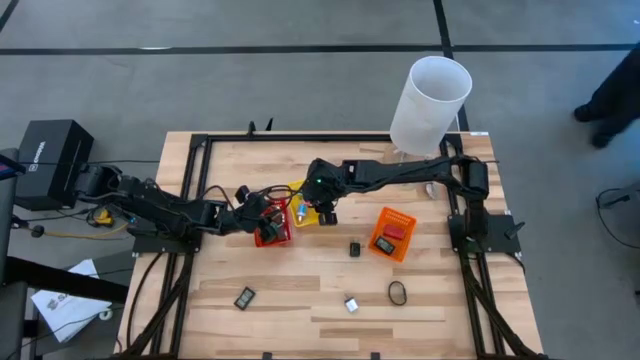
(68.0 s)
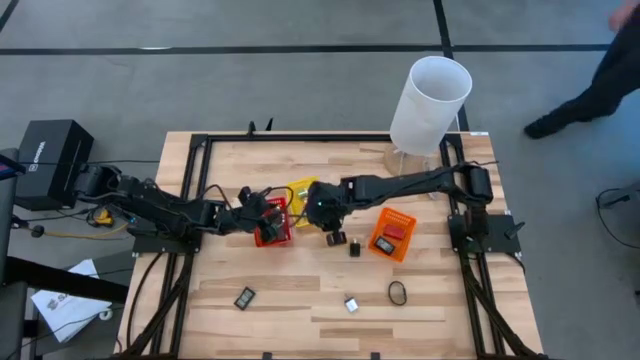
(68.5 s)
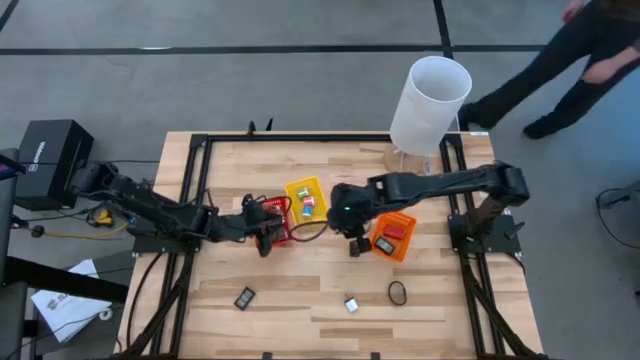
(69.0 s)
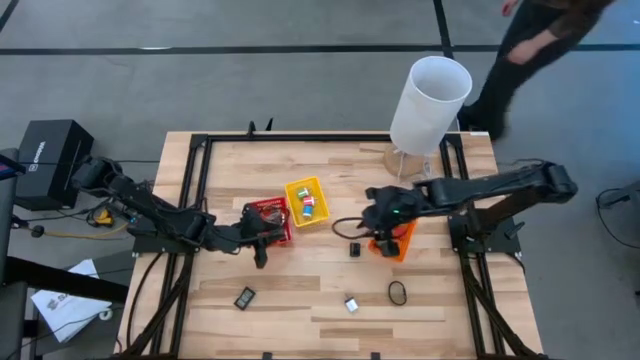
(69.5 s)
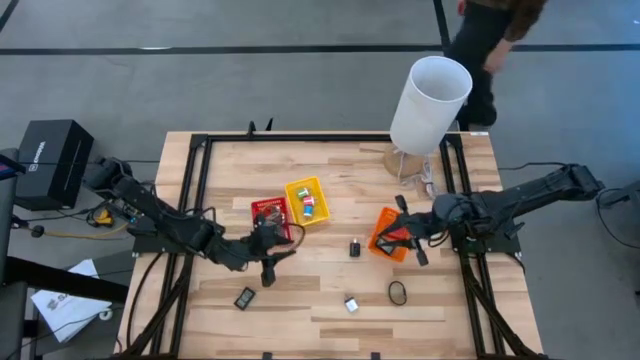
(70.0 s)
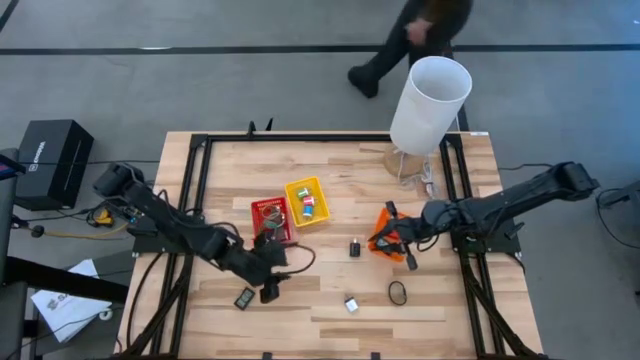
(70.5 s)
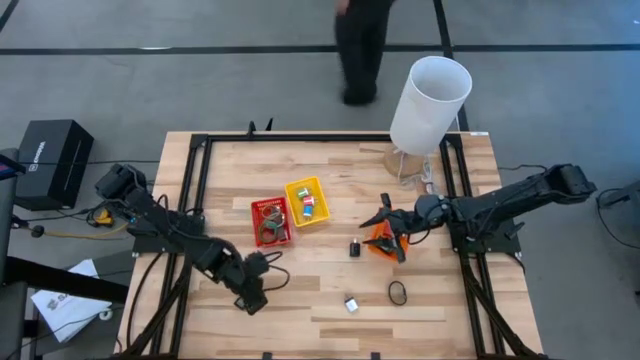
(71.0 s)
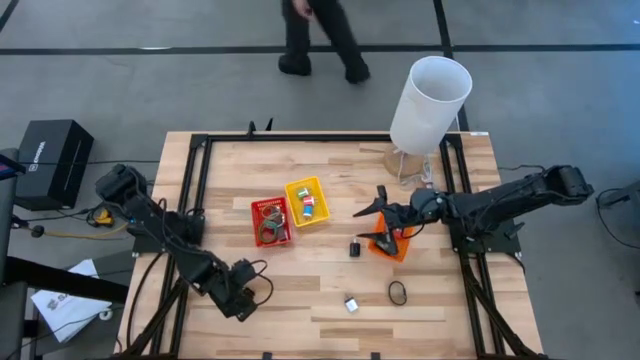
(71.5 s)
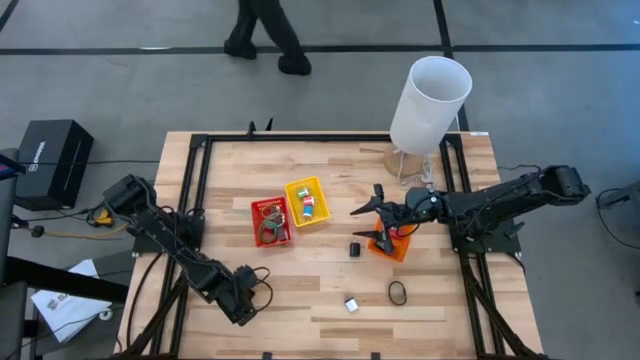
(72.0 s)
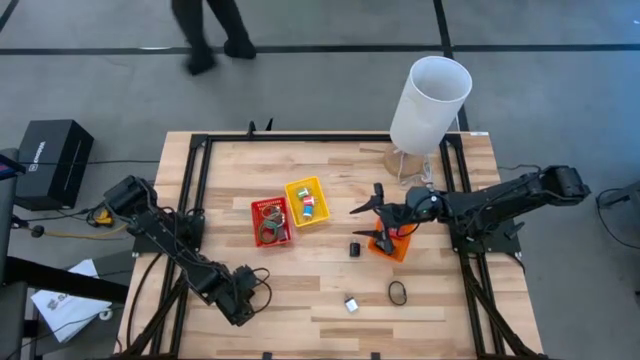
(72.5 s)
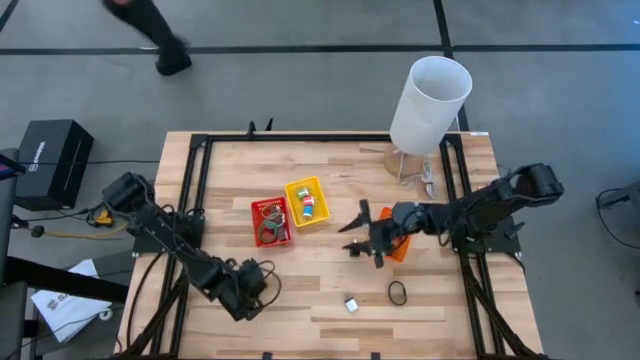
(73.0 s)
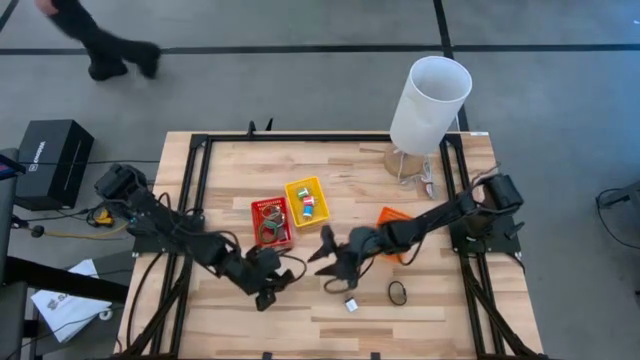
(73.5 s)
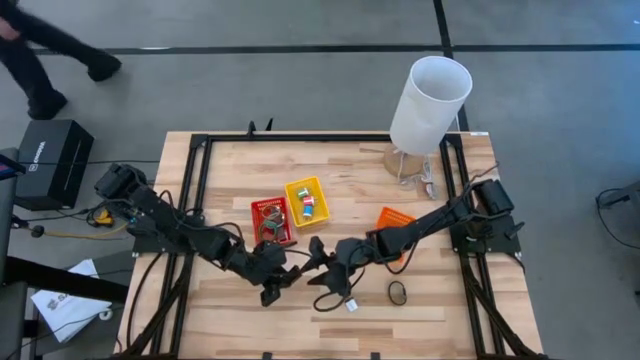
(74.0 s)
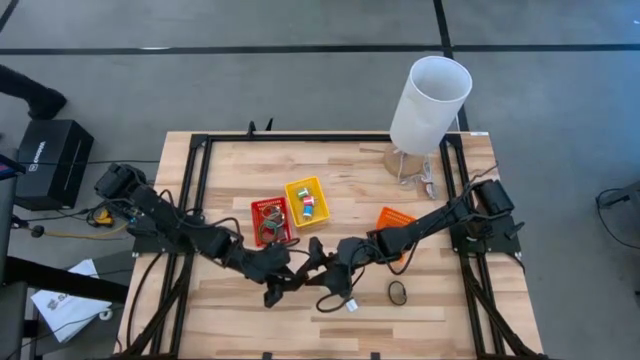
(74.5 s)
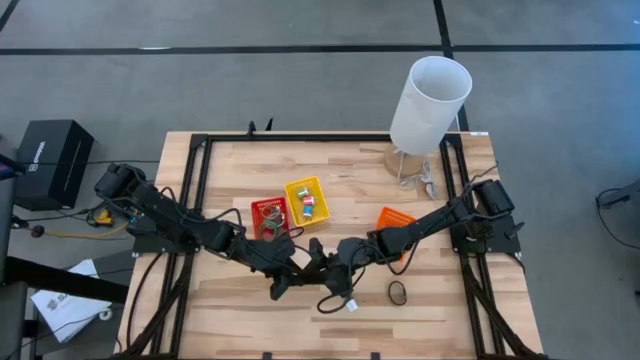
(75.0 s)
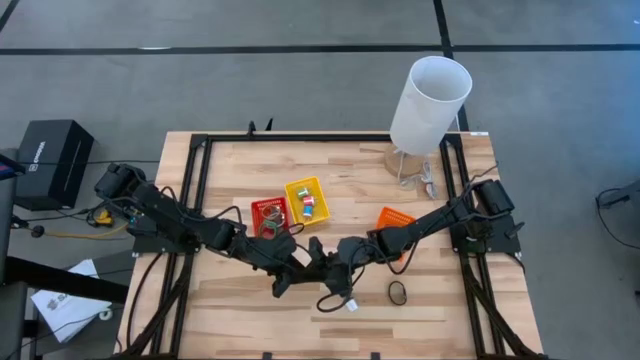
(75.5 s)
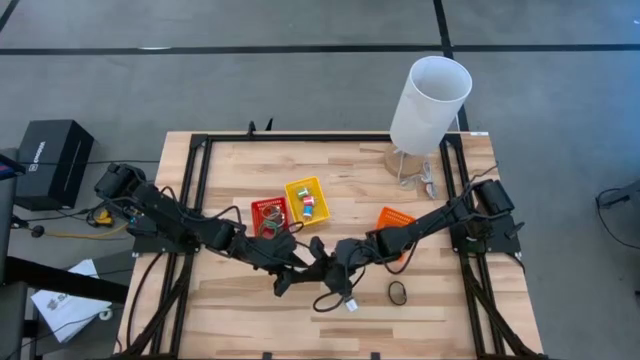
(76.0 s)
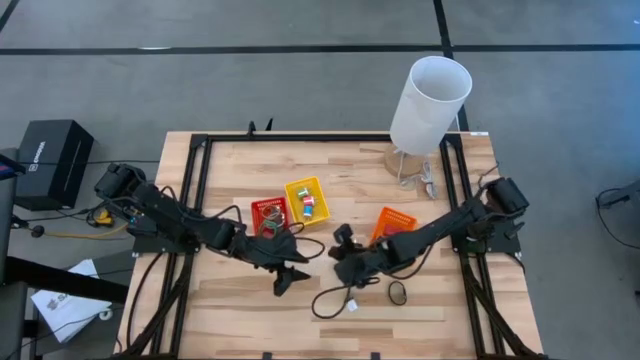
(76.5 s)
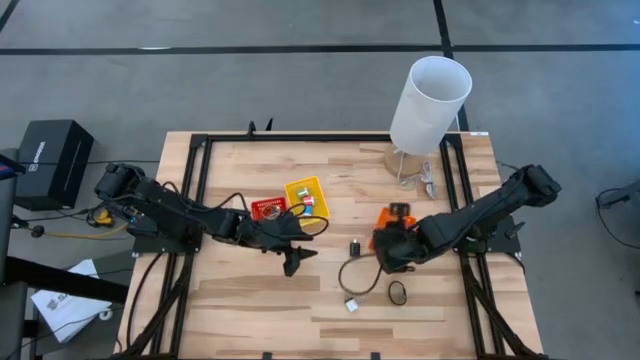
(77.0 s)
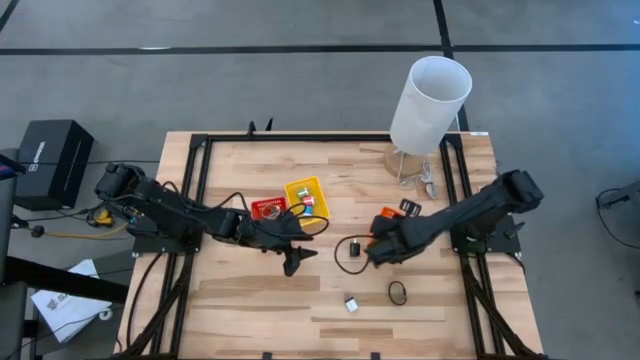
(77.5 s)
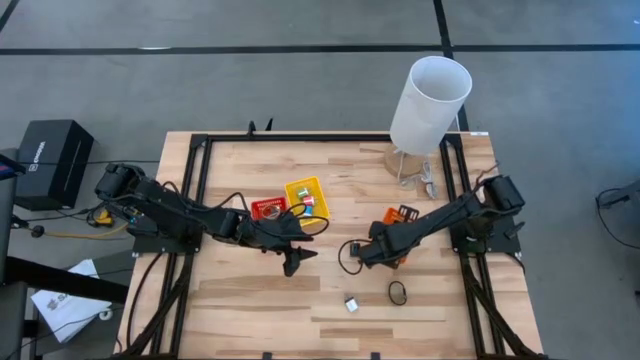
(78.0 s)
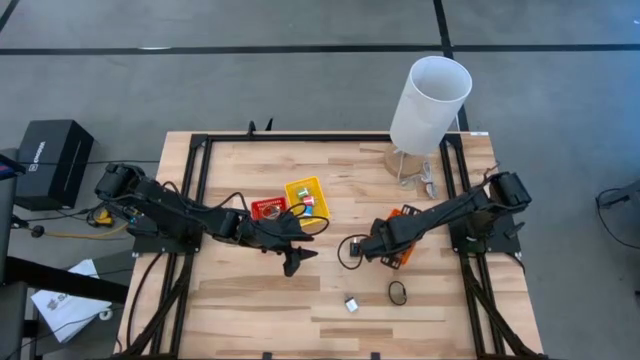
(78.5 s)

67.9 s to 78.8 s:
Task: Pick & Place Office items
Put the black digital clock into the orange bin

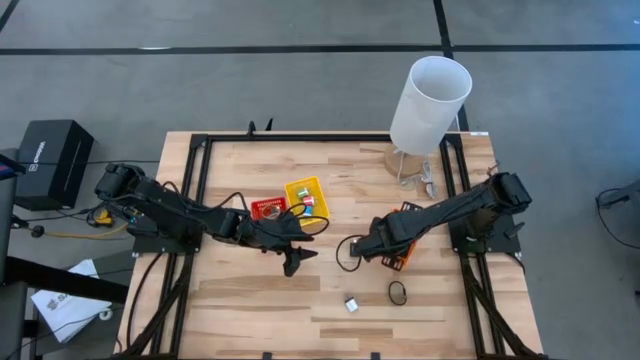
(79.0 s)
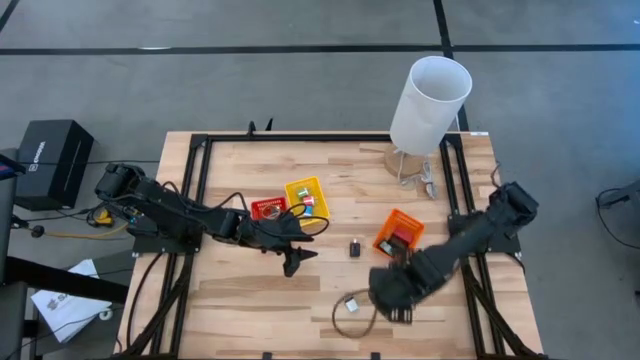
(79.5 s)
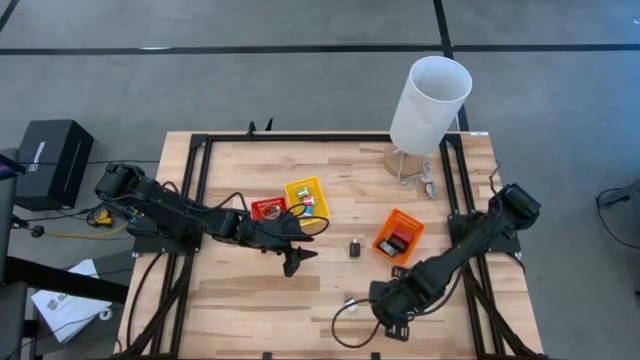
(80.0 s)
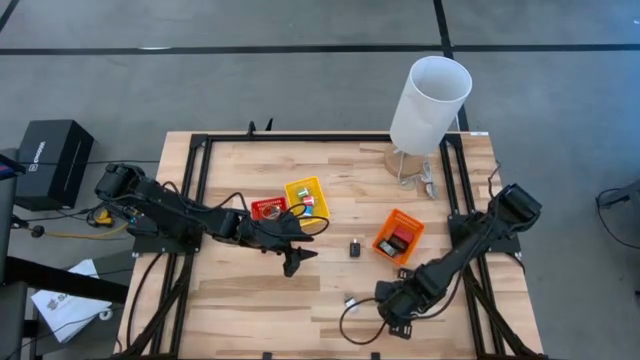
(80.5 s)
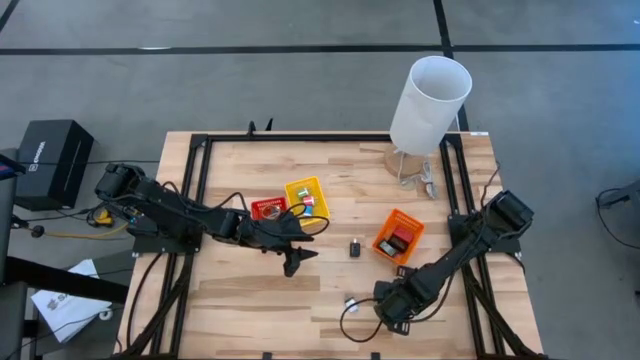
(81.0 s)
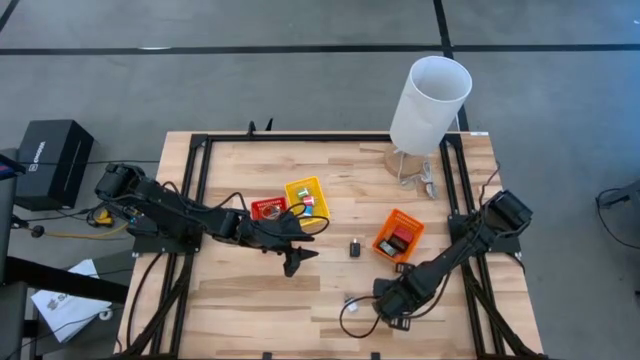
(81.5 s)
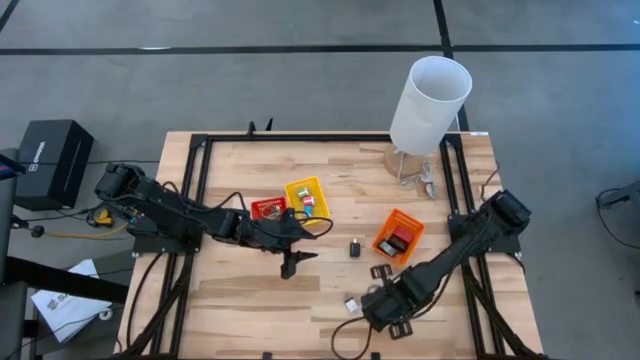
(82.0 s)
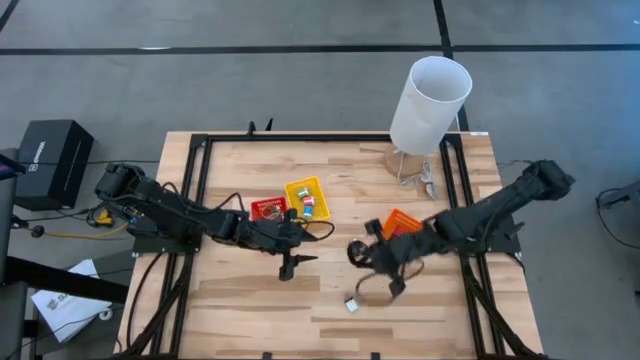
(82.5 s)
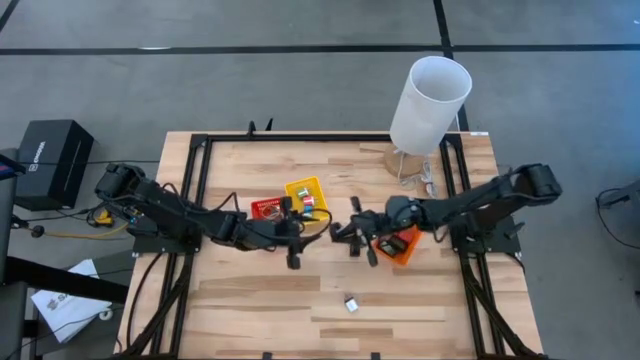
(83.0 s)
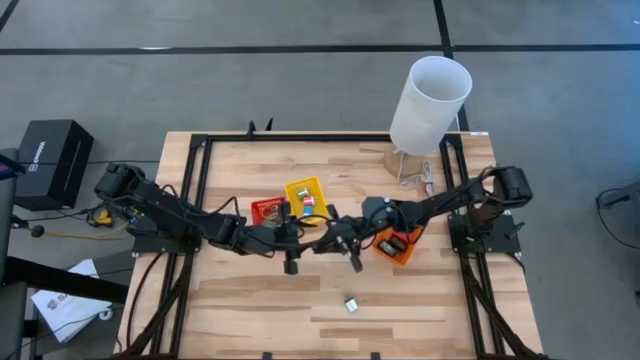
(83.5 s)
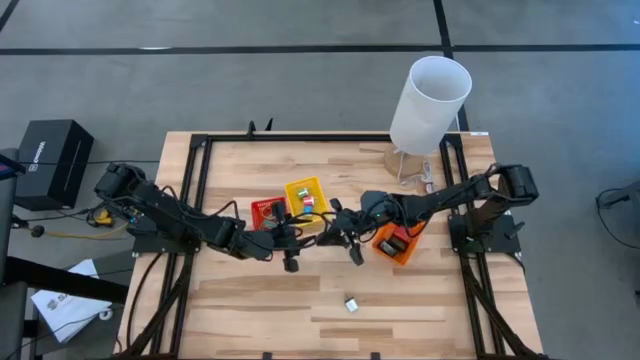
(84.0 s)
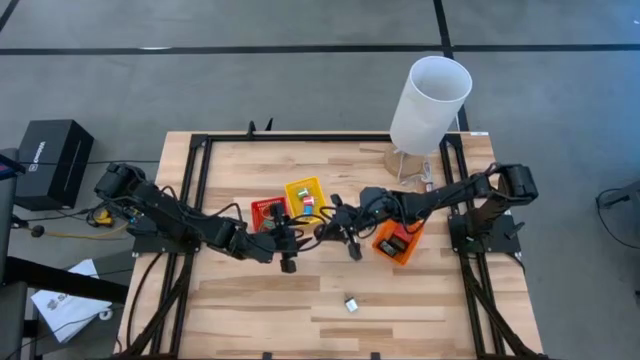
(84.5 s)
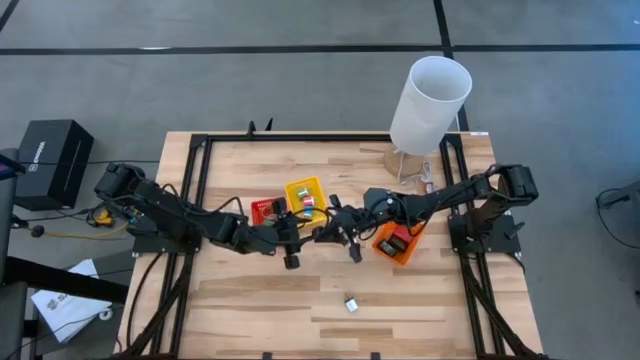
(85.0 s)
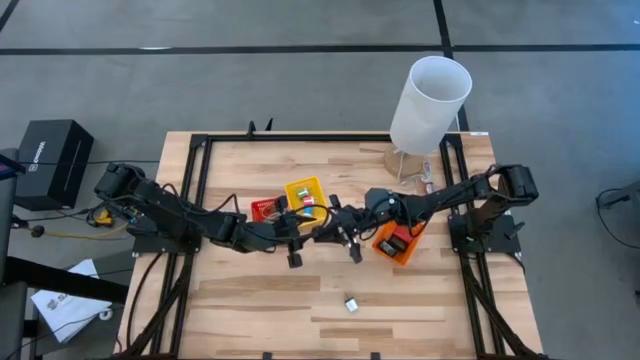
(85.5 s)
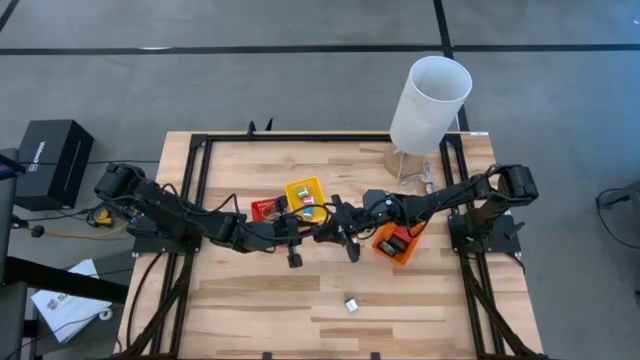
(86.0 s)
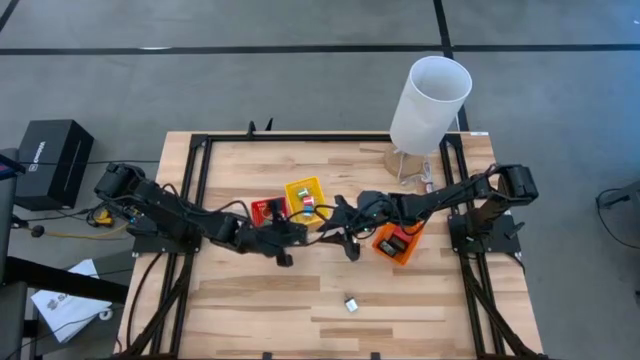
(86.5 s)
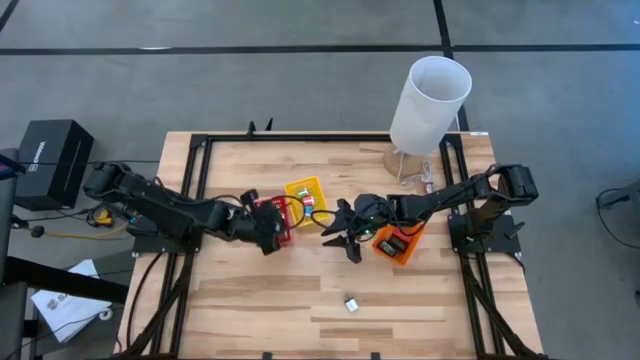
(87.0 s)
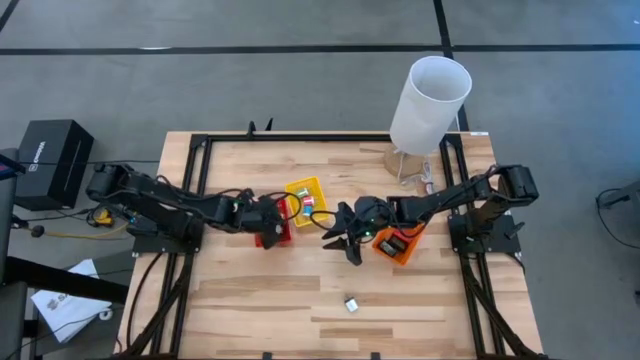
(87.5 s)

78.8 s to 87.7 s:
Put the black wrist watch into the red bin

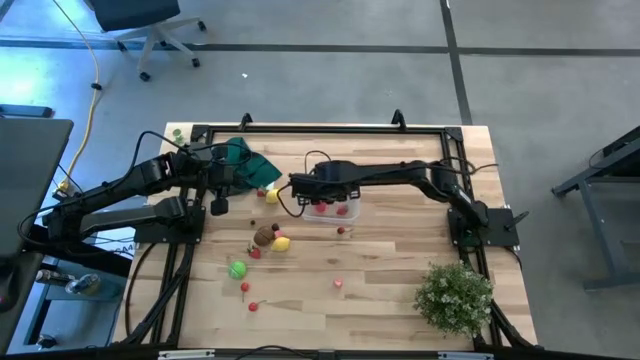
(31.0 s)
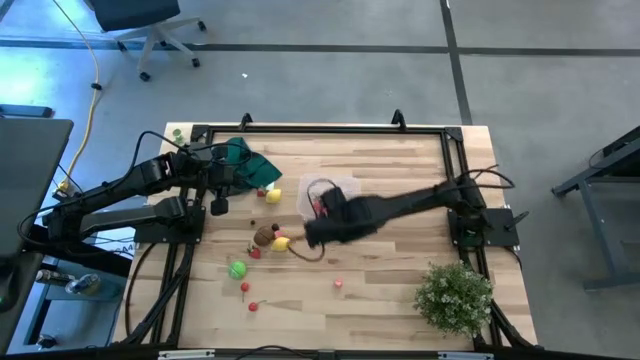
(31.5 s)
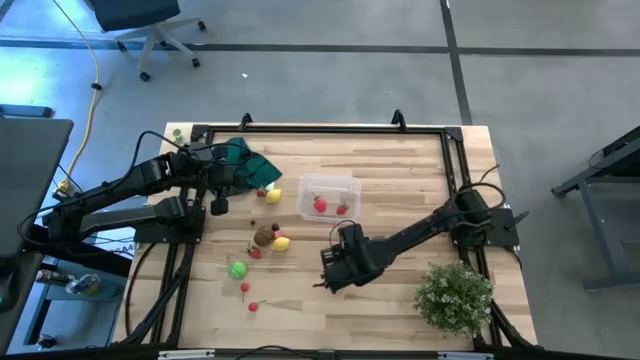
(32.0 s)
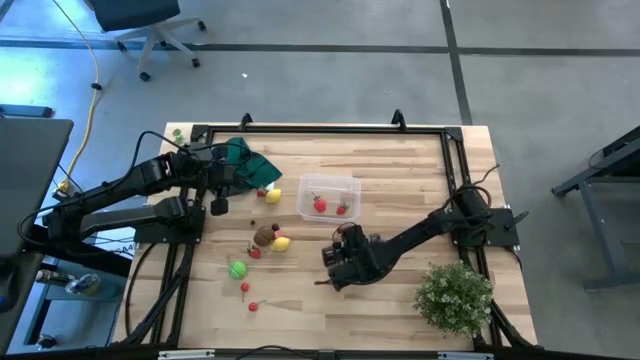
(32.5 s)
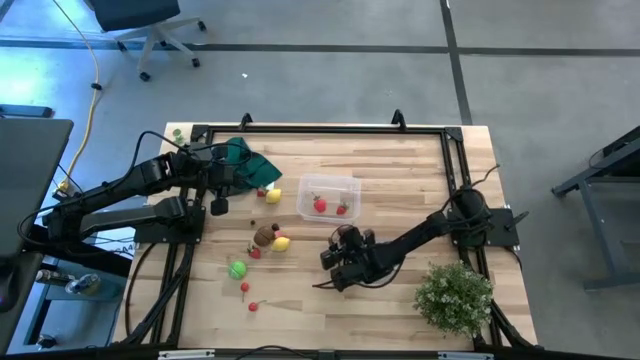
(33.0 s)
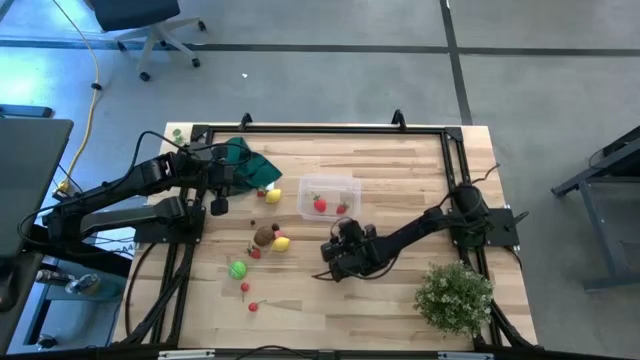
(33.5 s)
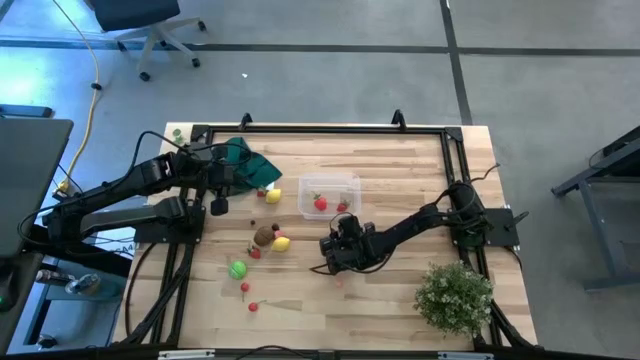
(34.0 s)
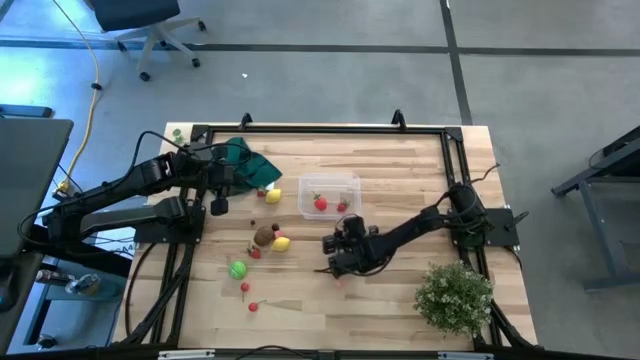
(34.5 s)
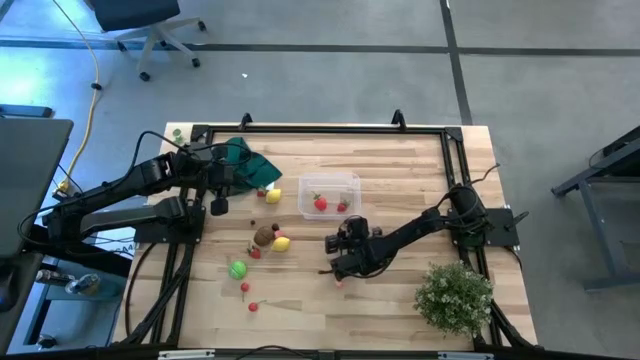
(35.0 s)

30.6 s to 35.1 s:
Task: Pick and placing Produce into tupperware
Put the top red cherry into the transparent bin
